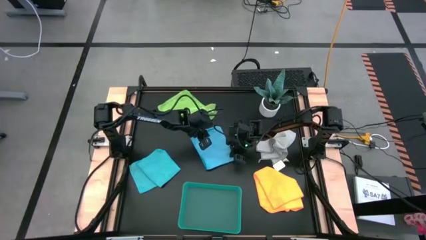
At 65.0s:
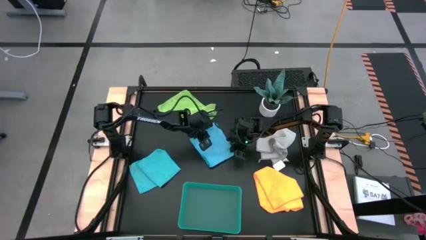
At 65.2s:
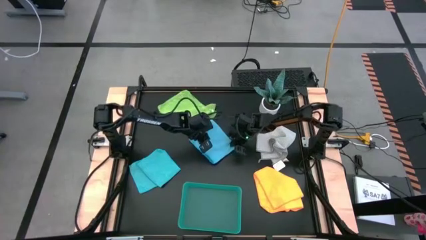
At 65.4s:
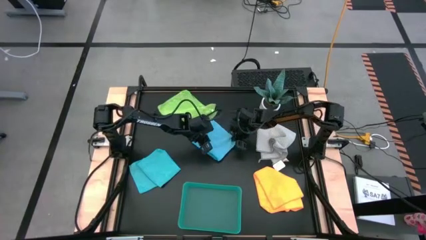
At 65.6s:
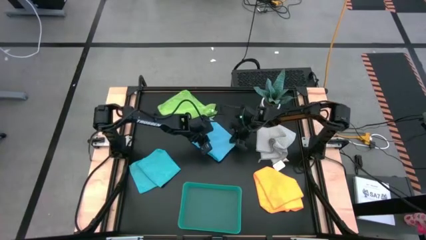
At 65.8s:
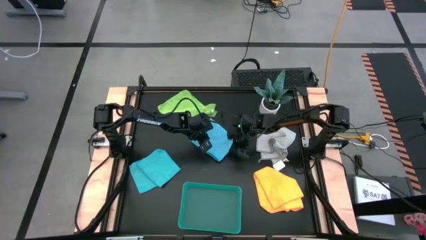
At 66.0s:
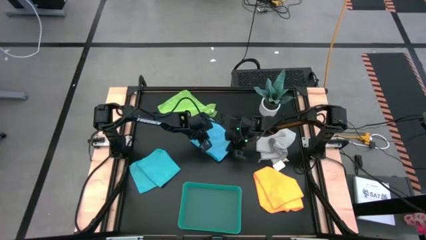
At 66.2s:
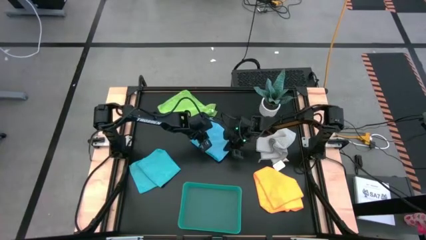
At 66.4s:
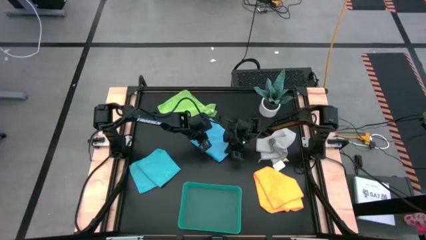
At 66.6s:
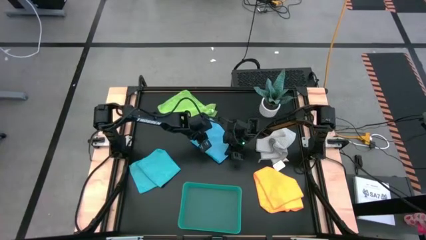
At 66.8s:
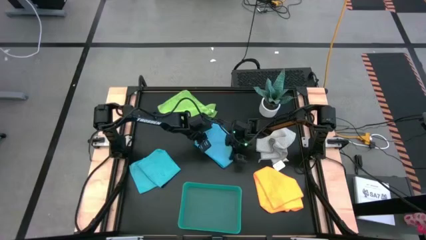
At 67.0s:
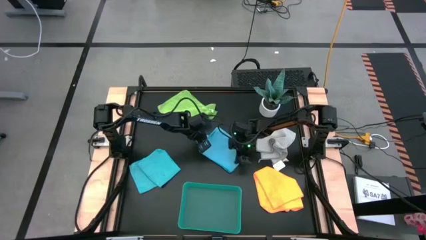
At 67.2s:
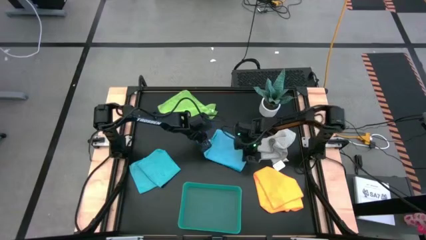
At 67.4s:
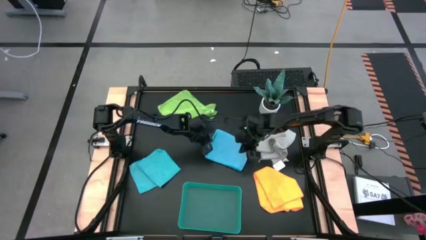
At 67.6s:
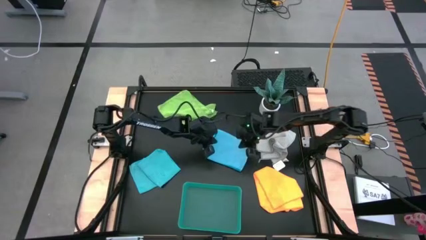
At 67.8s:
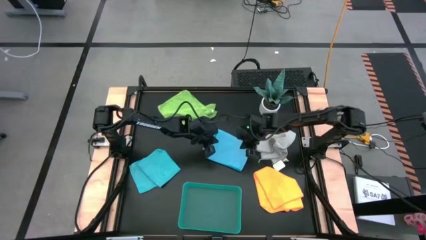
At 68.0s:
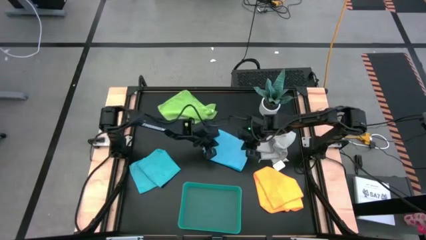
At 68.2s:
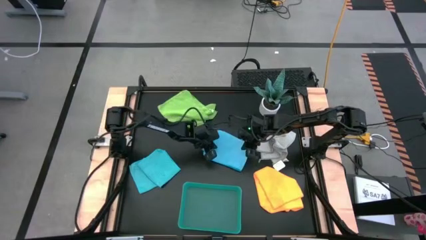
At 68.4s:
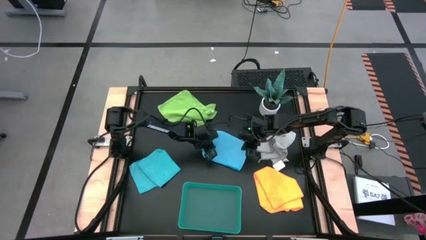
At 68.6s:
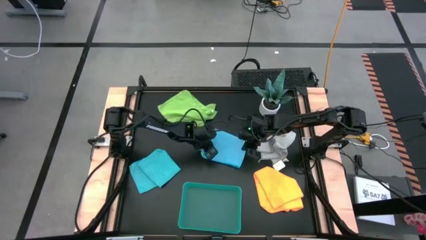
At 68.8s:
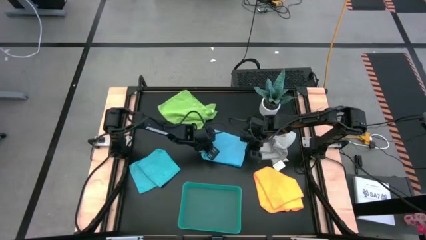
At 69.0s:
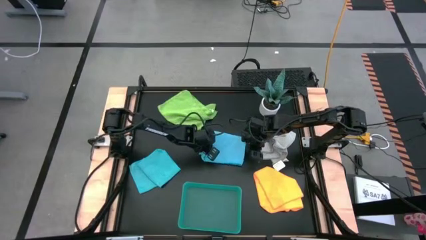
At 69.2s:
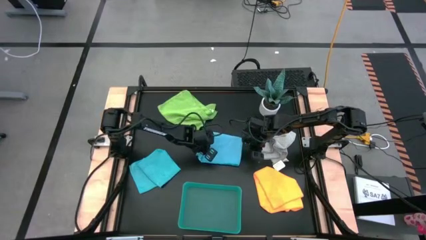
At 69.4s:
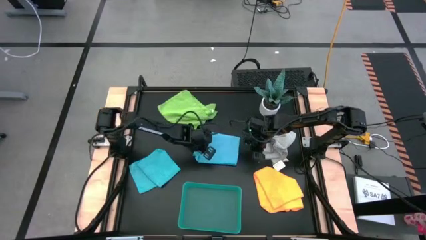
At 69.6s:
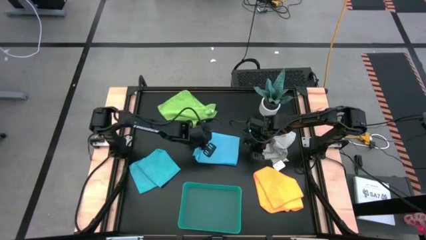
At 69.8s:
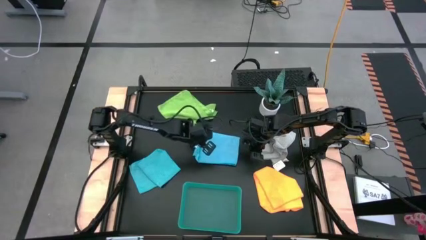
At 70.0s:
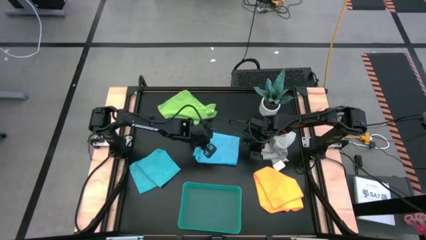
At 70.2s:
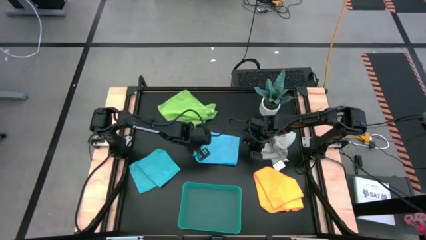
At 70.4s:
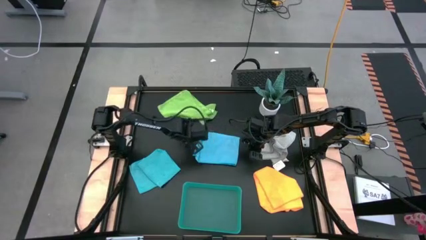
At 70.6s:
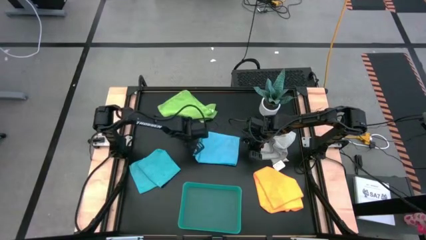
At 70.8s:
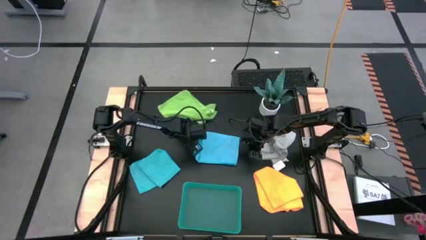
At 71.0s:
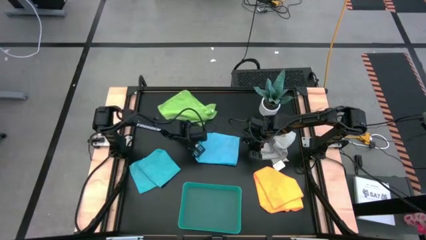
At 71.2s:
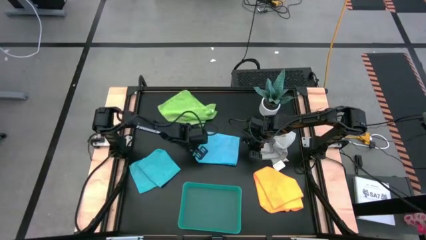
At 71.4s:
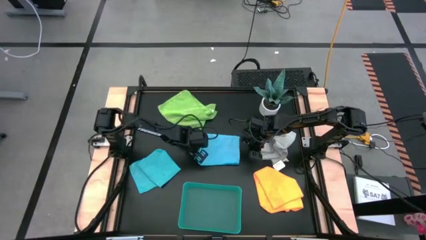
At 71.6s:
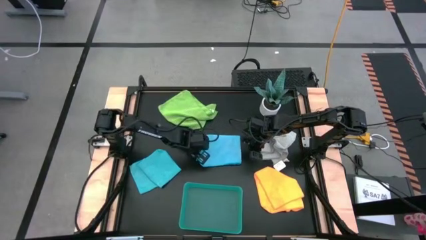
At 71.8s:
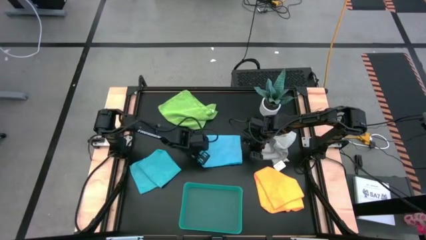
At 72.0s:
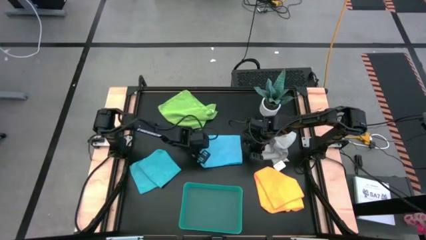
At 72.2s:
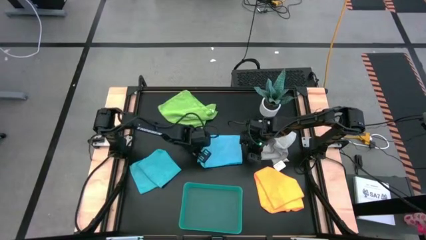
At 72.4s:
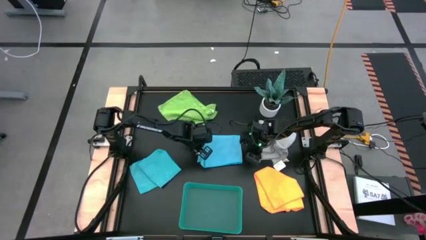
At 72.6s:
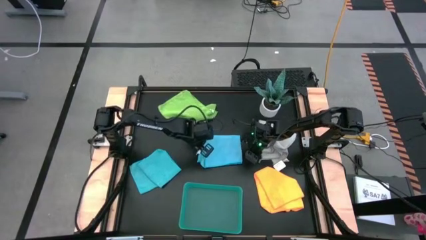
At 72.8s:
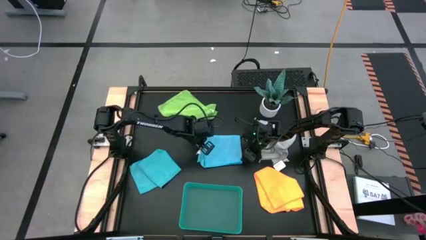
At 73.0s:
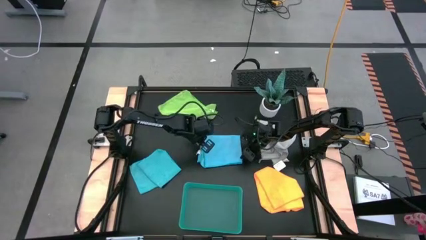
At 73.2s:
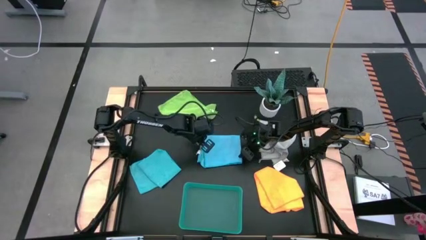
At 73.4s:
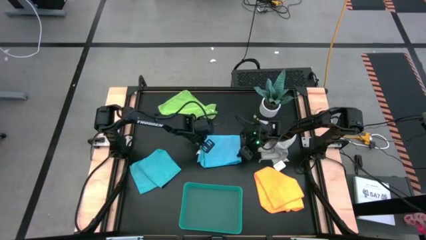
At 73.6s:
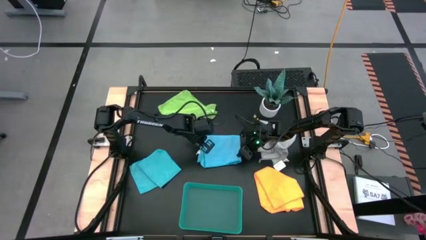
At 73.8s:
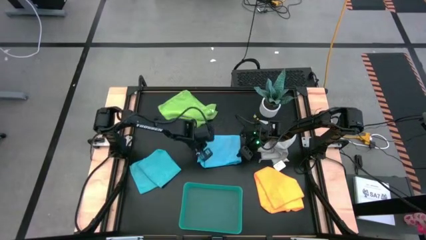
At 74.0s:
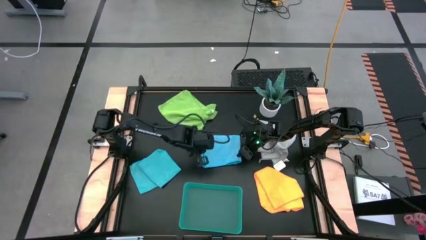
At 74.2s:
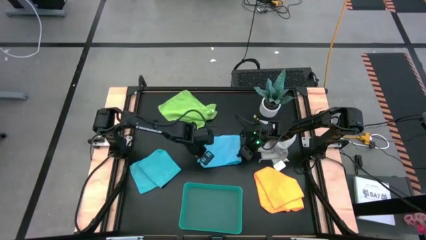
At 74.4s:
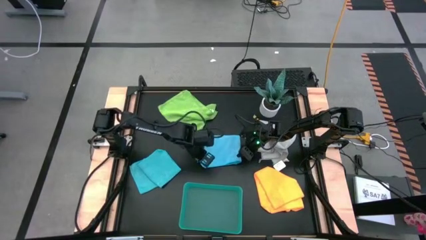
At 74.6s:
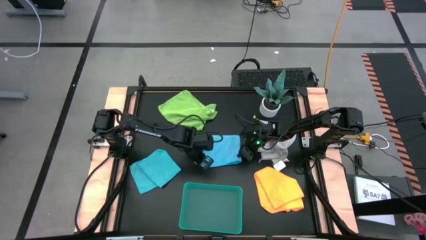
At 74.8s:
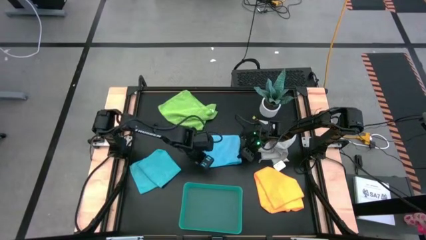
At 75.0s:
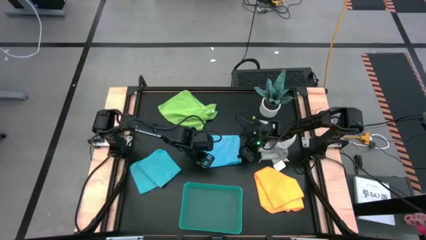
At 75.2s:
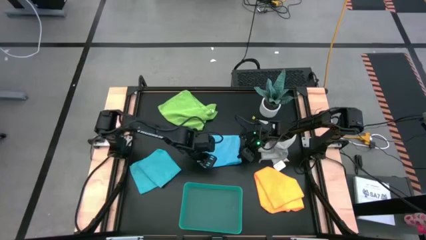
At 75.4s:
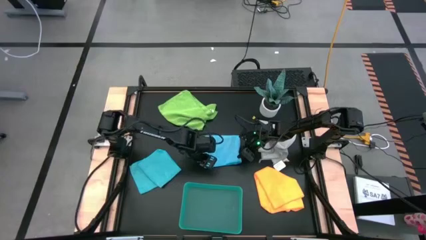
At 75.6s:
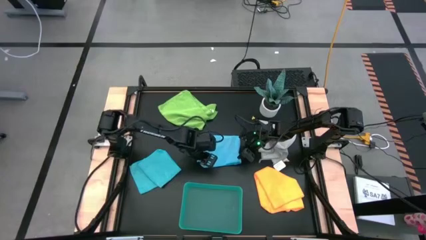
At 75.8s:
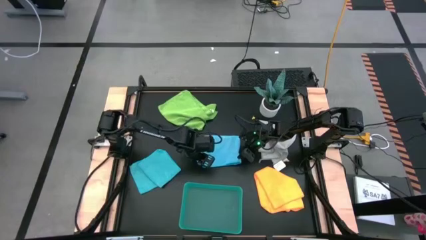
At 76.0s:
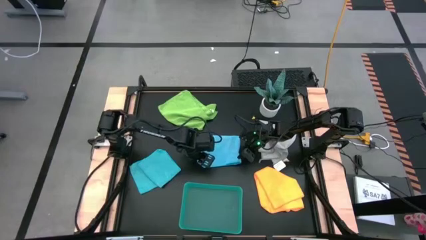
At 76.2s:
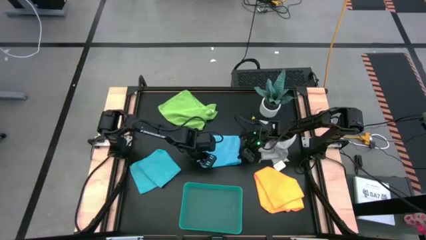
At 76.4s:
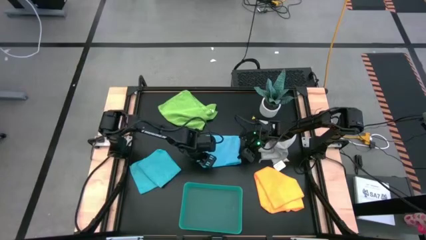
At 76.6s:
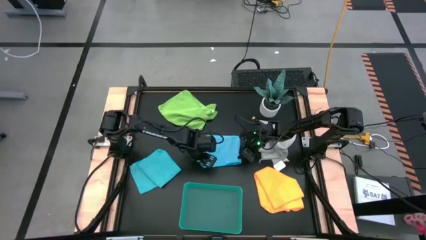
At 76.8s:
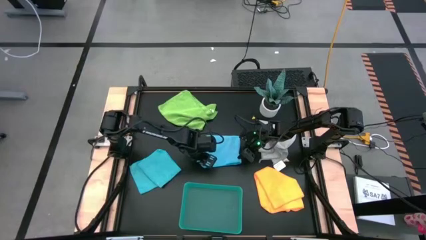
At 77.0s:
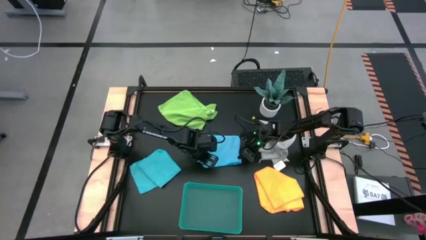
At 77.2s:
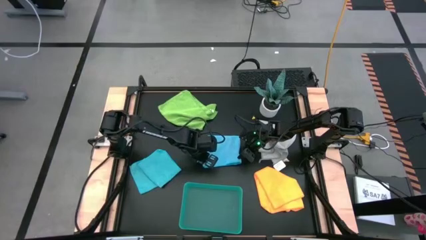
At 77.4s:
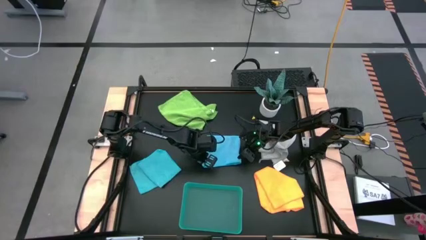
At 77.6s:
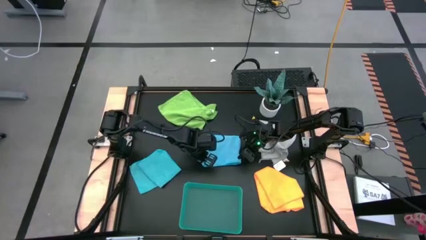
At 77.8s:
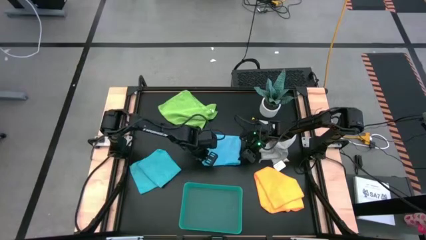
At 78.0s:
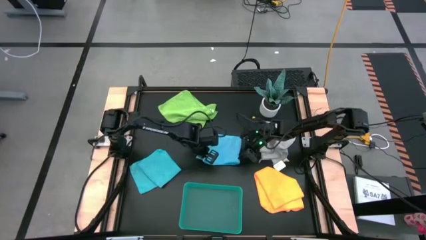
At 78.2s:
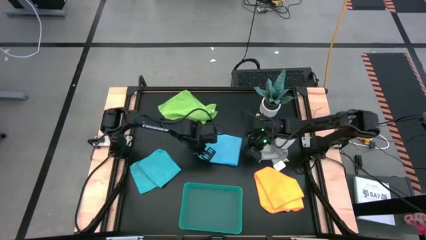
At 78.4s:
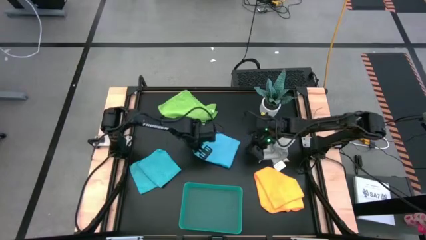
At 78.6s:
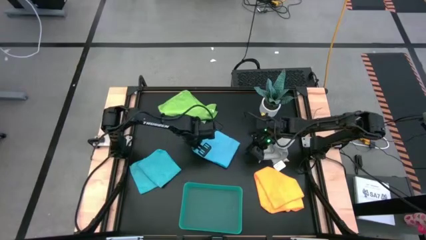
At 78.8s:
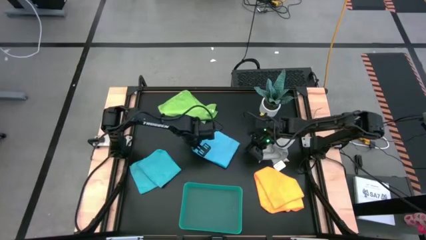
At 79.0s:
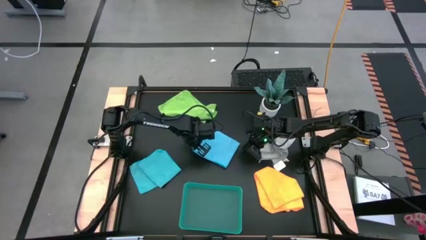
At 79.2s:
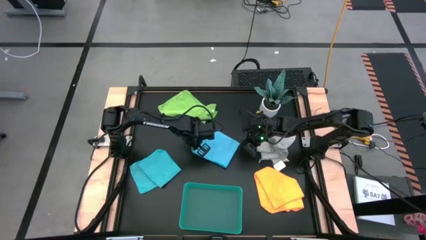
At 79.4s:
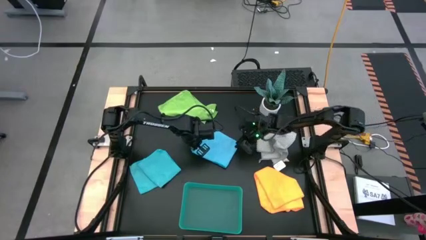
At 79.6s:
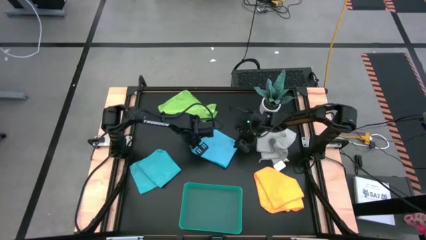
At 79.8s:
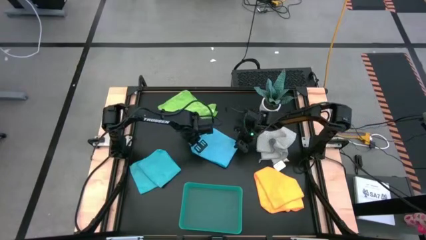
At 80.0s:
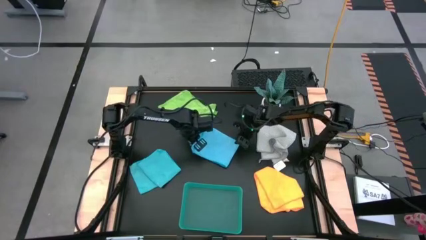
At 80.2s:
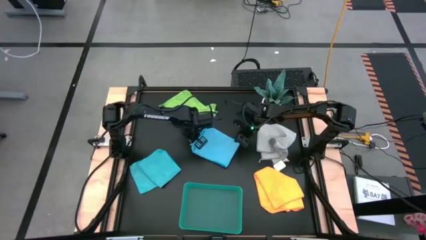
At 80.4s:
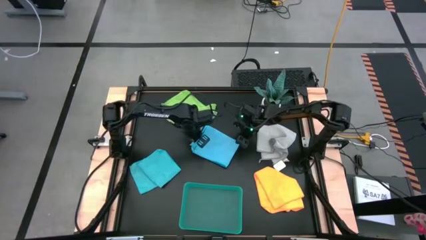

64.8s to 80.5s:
Task: Fold microfiber towels
Fold the right blue microfiber cloth
